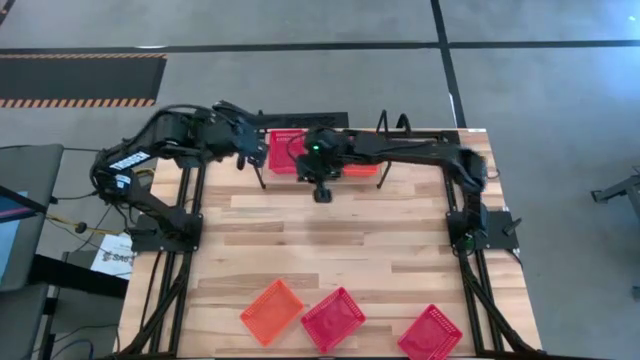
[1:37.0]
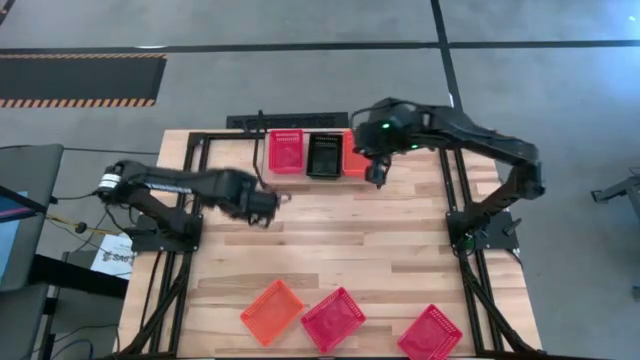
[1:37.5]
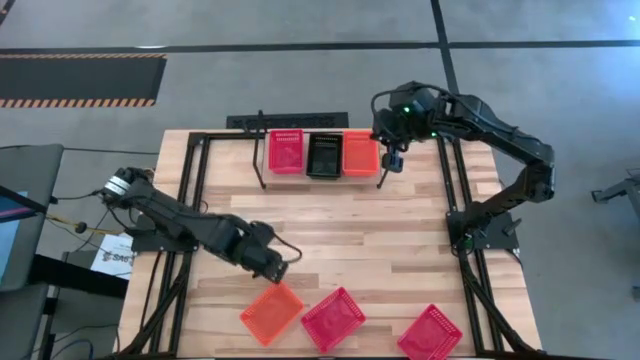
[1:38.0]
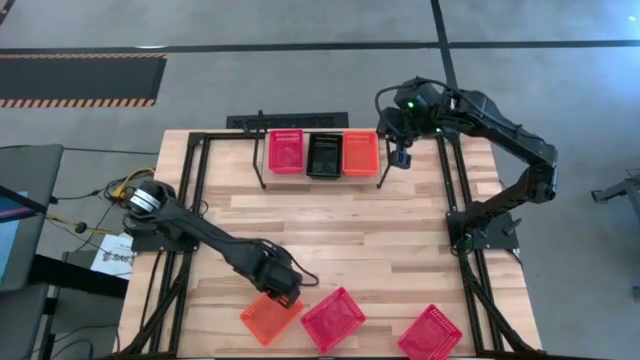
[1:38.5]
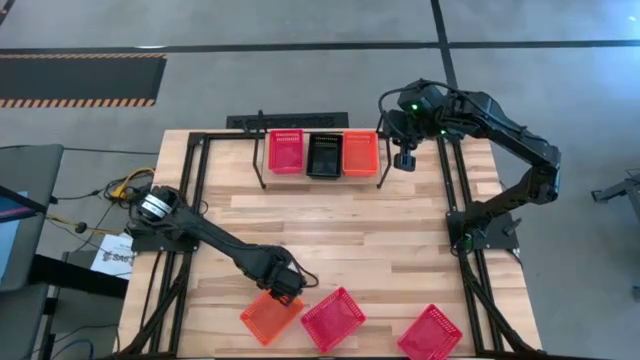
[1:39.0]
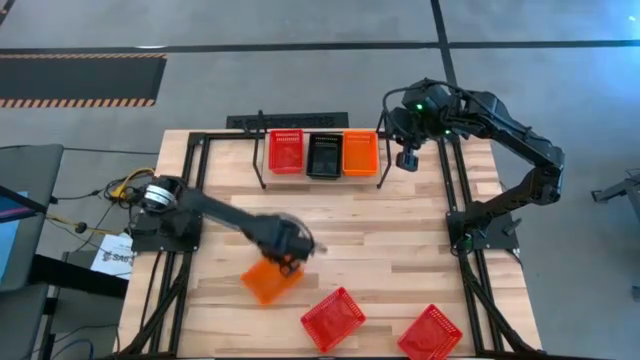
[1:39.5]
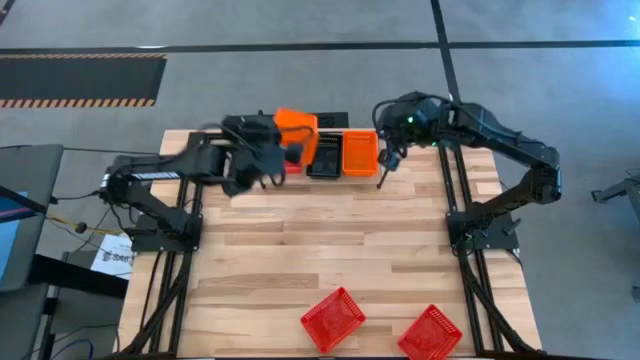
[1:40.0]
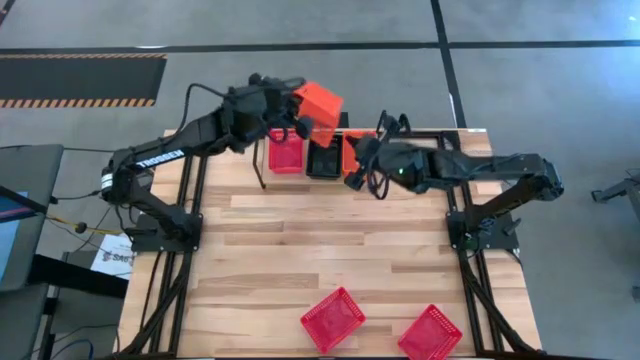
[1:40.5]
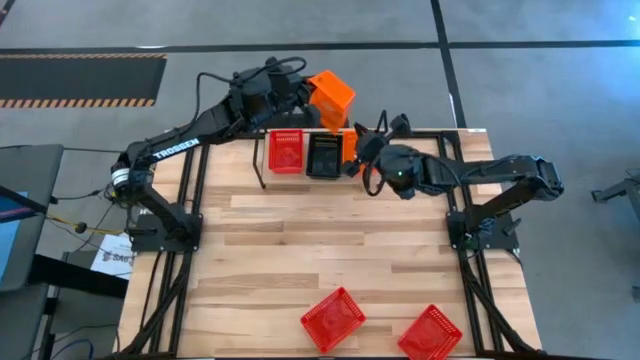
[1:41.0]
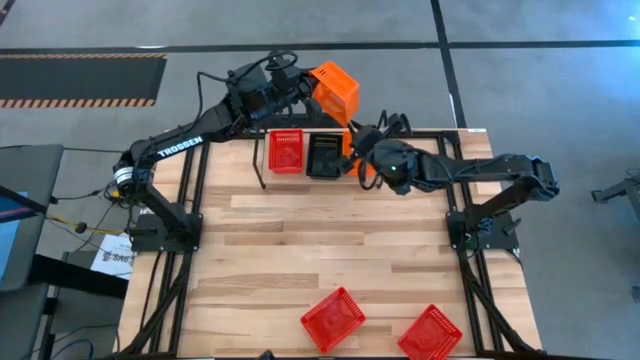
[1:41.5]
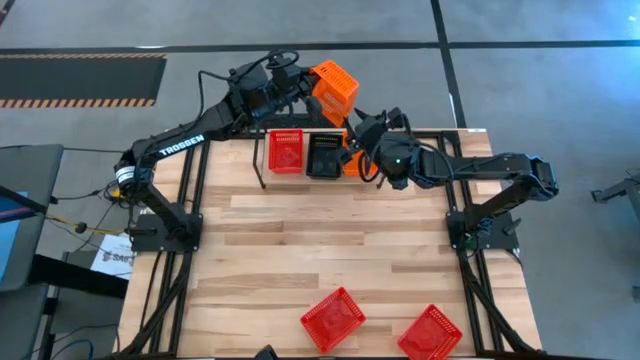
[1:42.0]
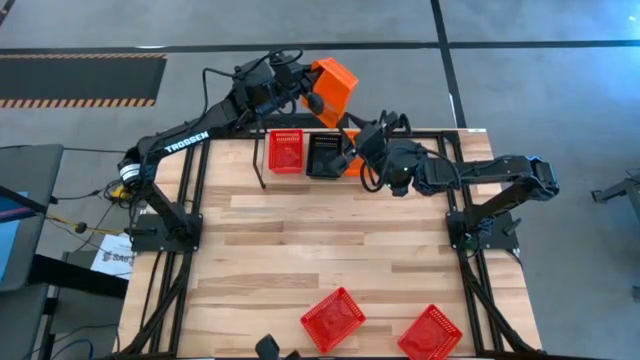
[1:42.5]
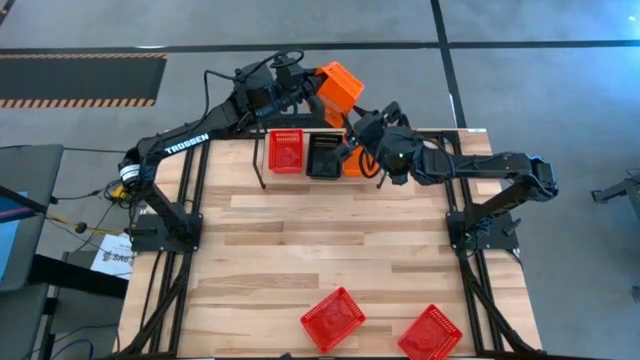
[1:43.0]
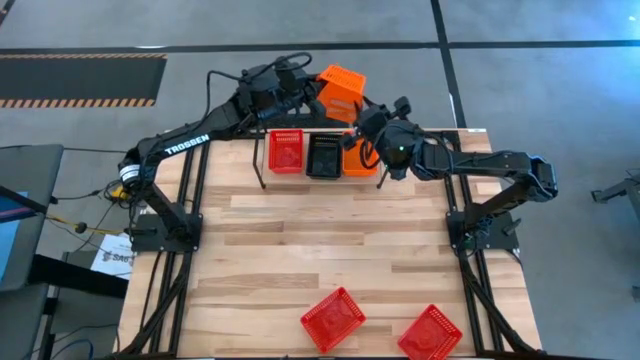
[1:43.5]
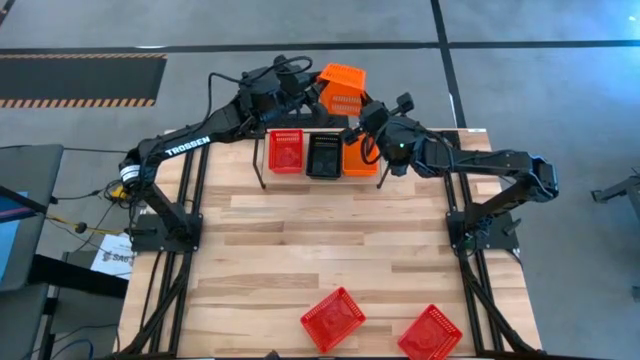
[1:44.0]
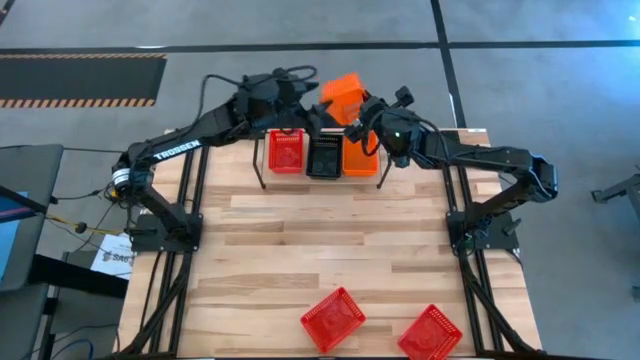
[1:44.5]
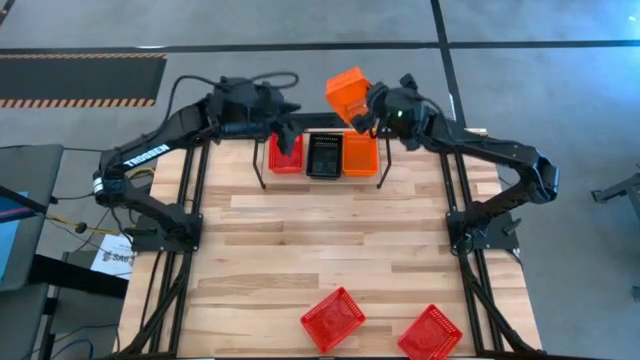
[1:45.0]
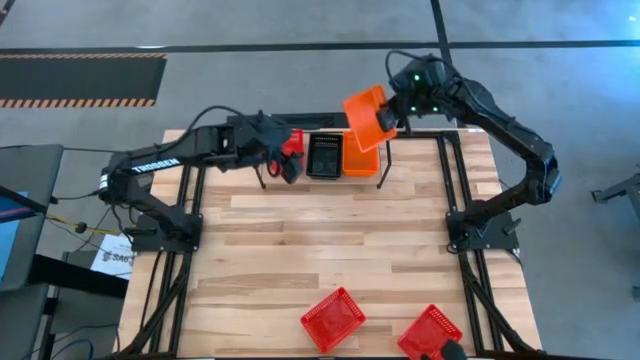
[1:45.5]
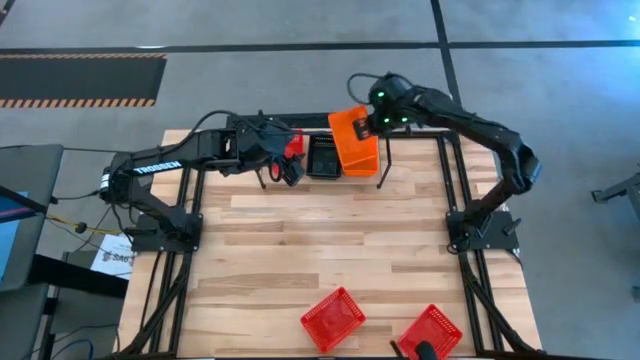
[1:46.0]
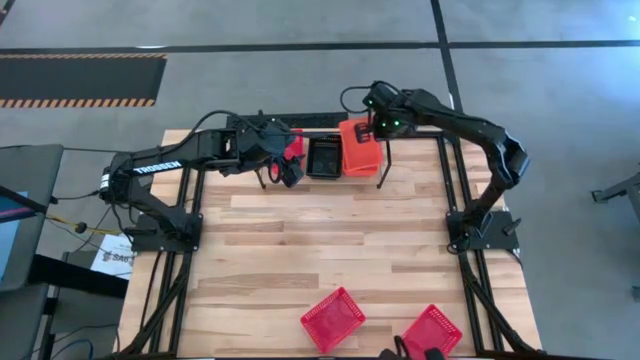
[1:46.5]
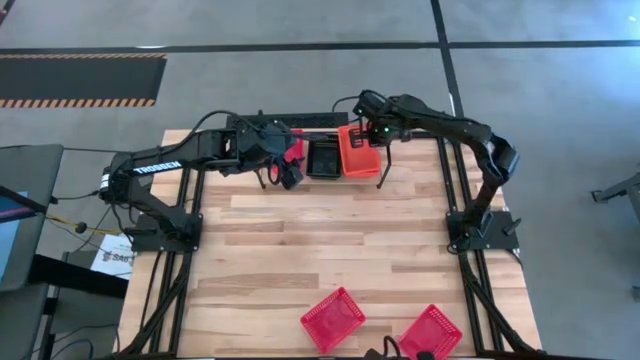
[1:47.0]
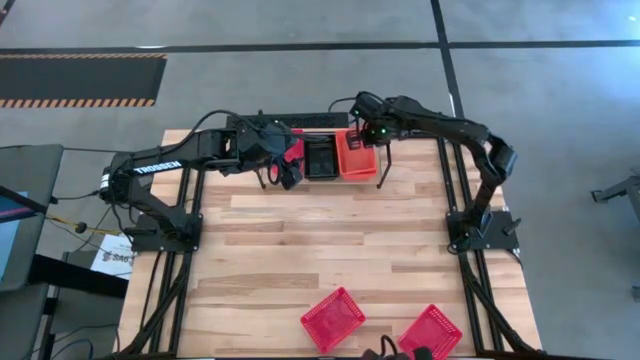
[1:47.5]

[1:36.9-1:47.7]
Task: Stack baskets on shelf by color
Stack the orange bin on top of the orange bin on the shelf

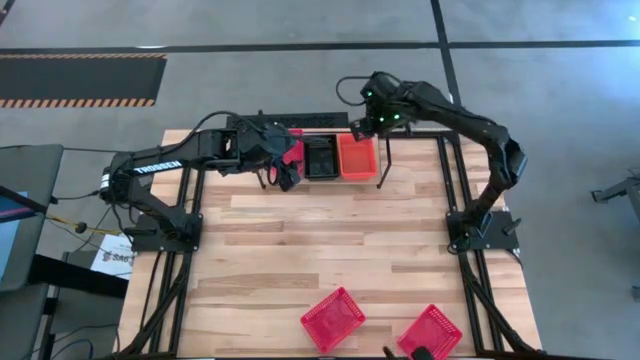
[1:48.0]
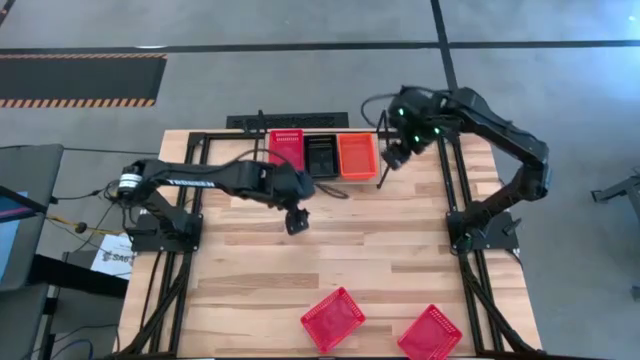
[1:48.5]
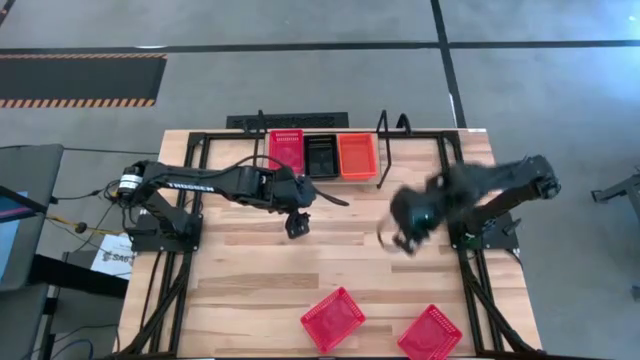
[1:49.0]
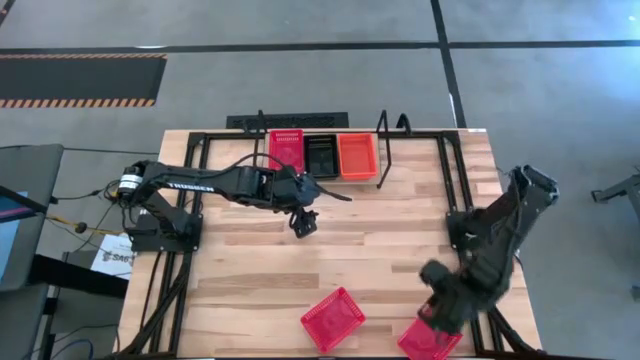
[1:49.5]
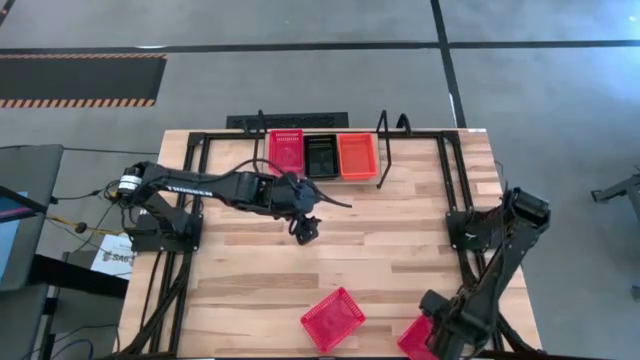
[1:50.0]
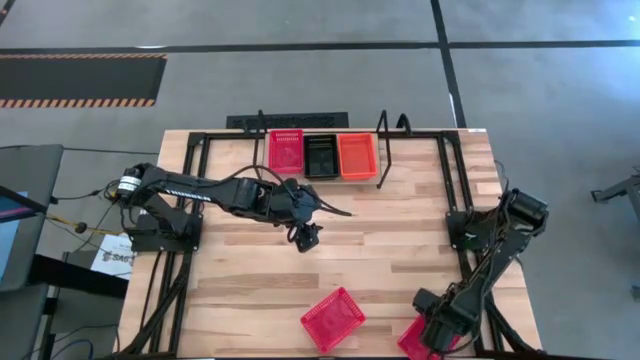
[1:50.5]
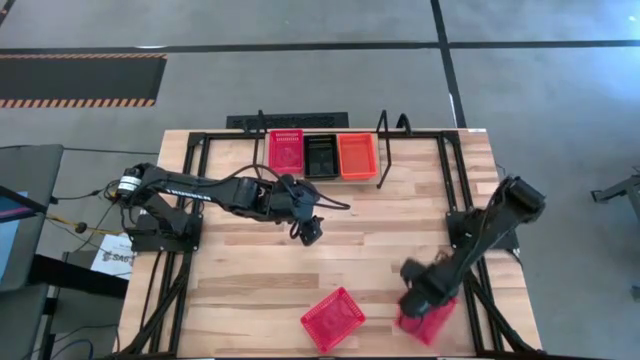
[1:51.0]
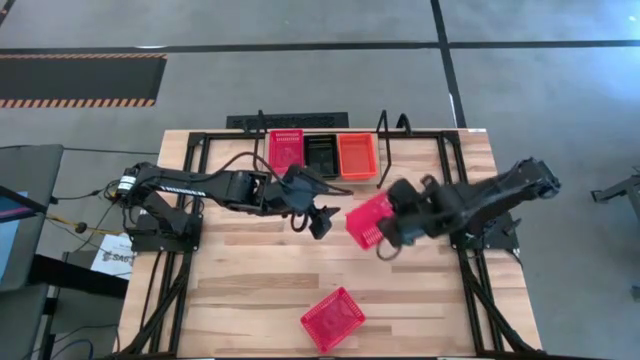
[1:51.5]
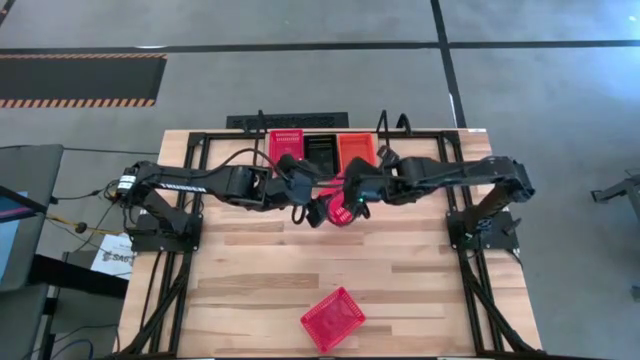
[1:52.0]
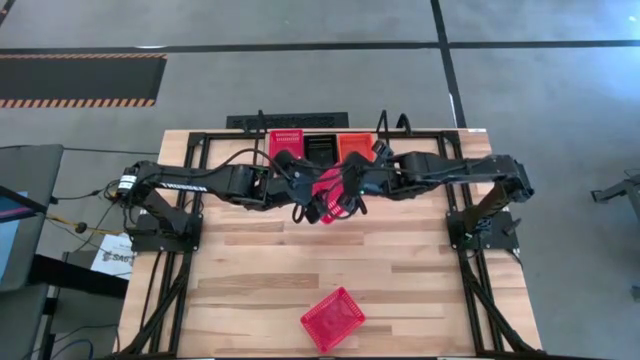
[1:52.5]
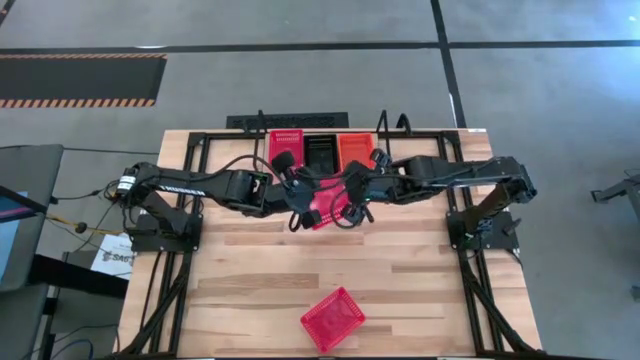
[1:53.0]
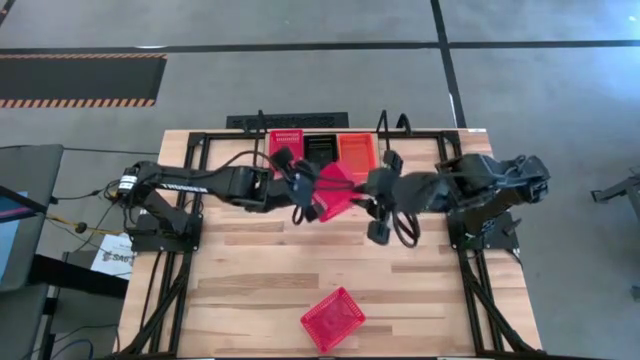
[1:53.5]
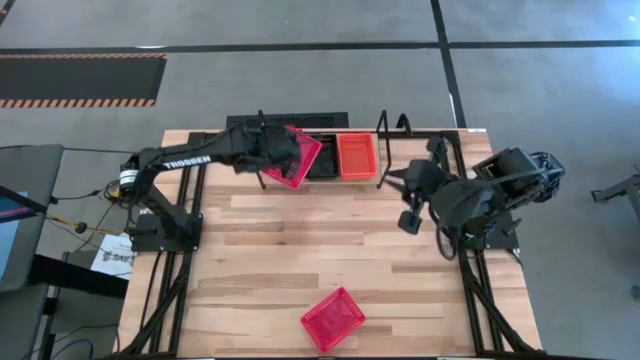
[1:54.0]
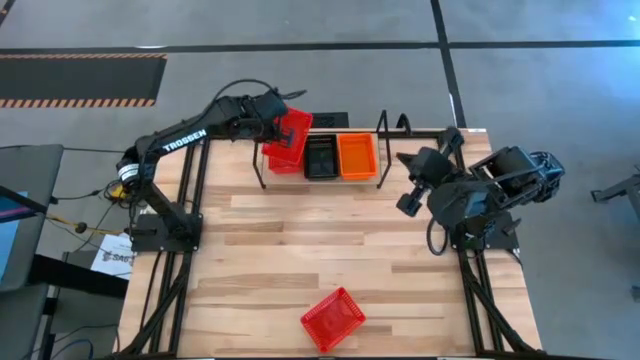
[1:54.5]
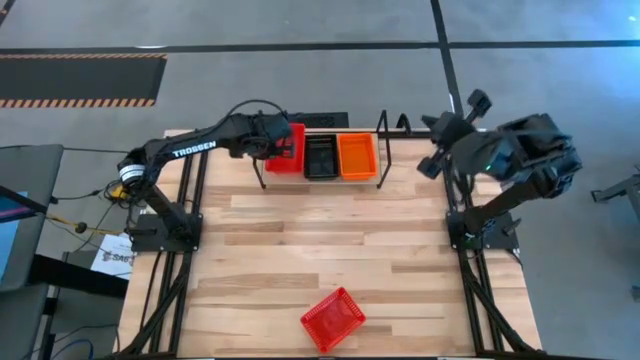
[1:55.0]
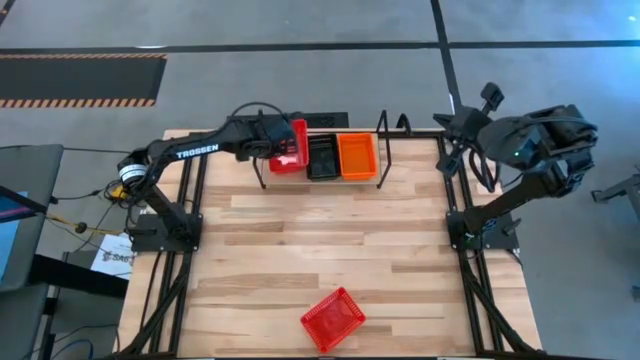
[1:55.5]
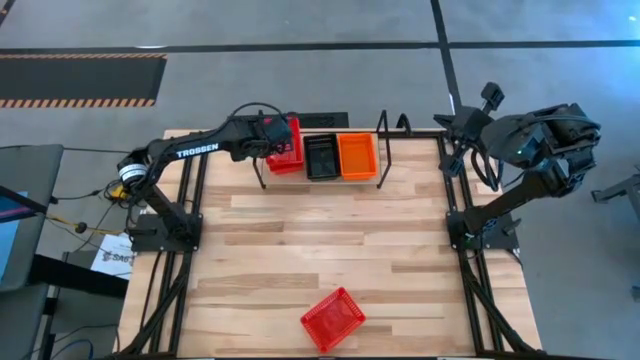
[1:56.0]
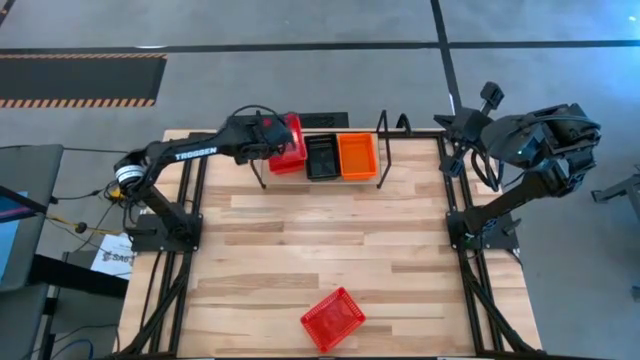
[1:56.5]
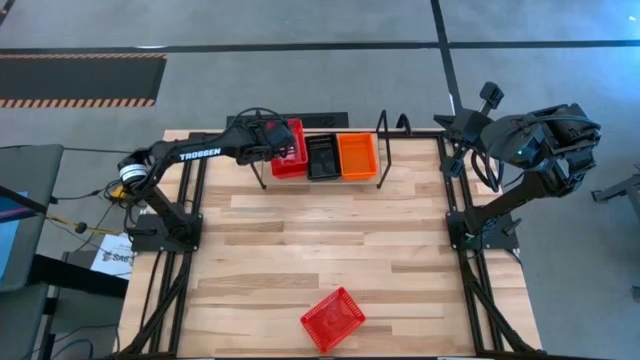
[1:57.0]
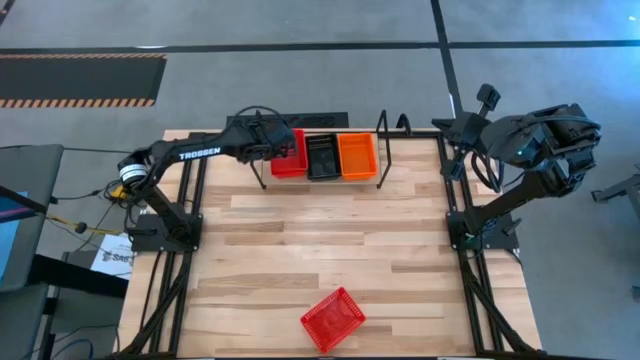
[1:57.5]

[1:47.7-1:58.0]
Stack the right red bin on top of the red bin on the shelf
